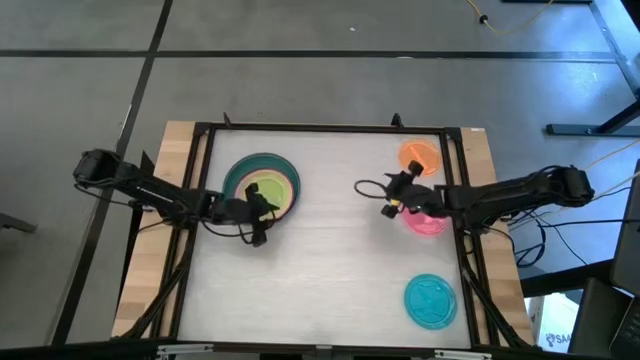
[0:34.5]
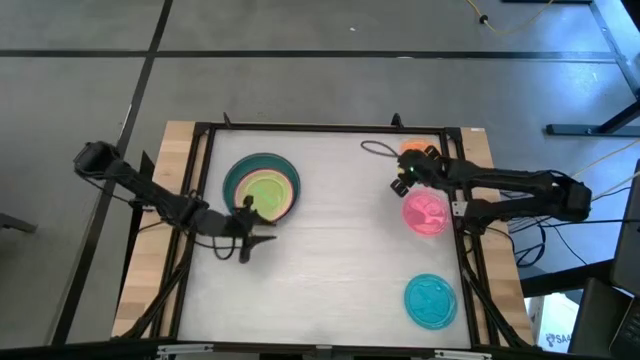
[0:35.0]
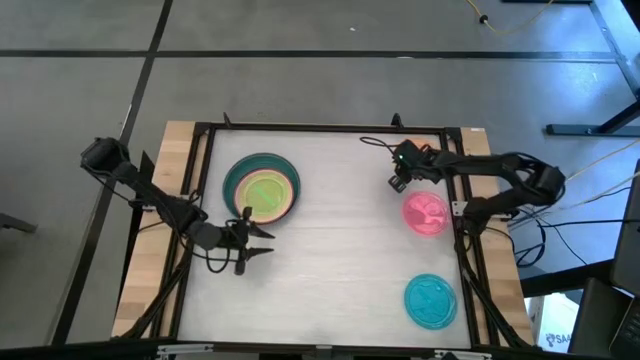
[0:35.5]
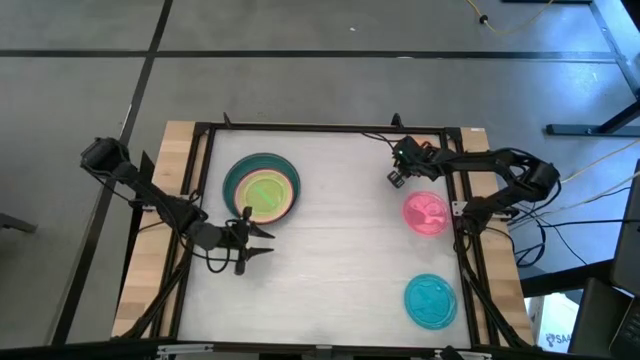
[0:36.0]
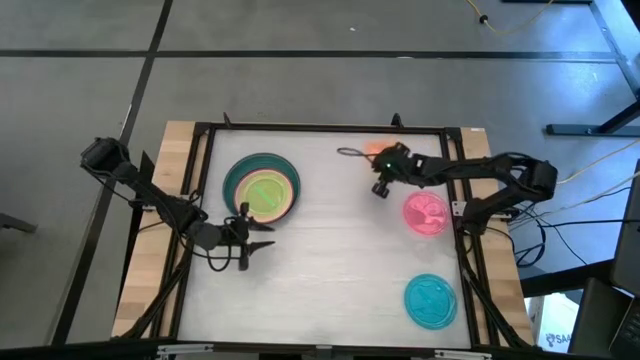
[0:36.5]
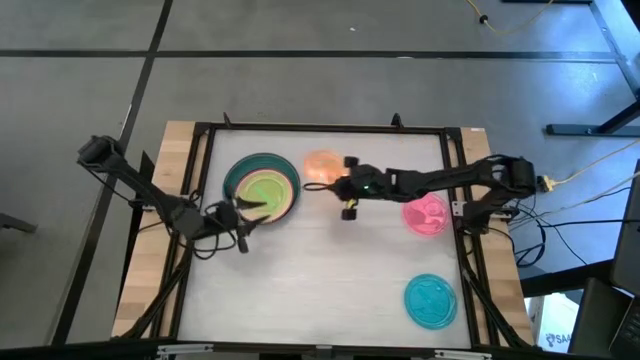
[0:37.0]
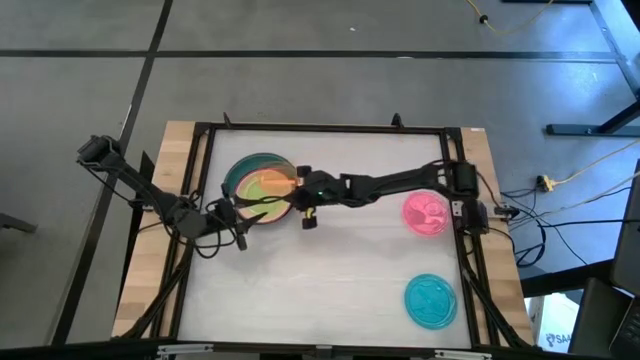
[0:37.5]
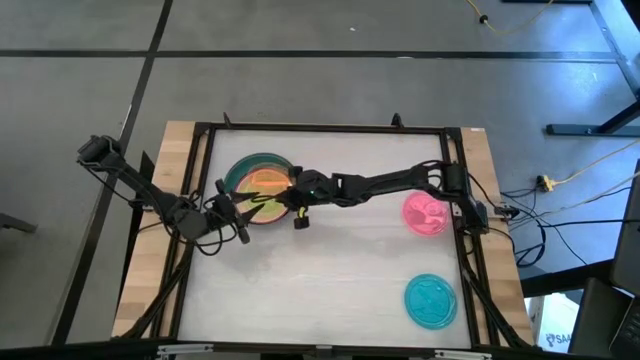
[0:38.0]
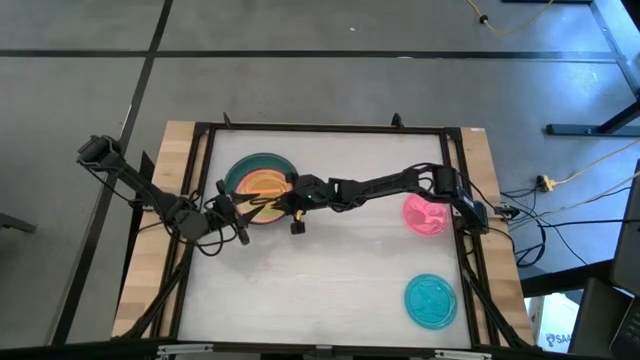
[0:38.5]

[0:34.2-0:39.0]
Task: Stack plastic plates
Stack the orange plate on top of the green plate

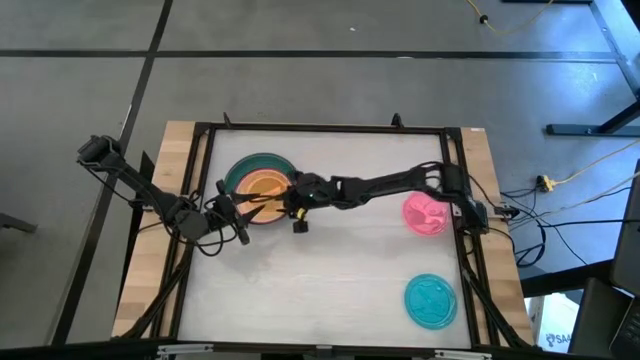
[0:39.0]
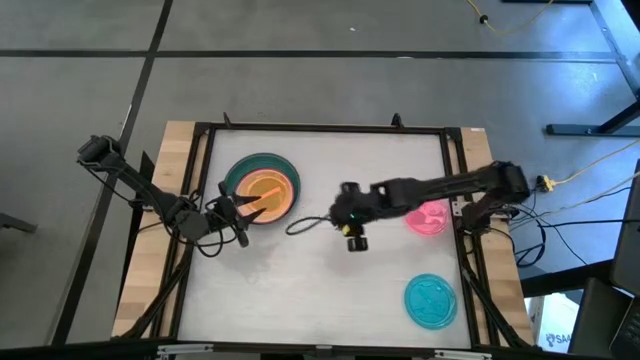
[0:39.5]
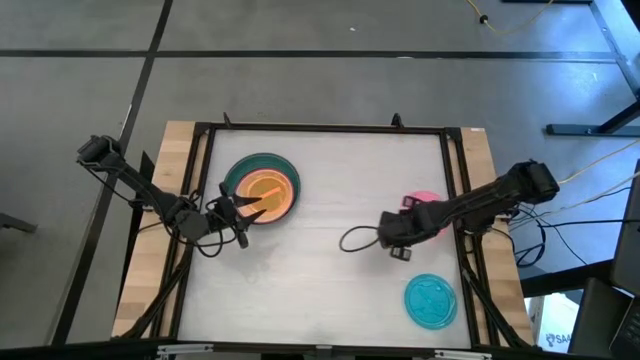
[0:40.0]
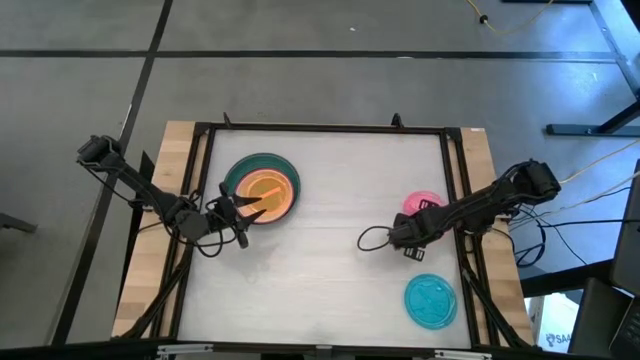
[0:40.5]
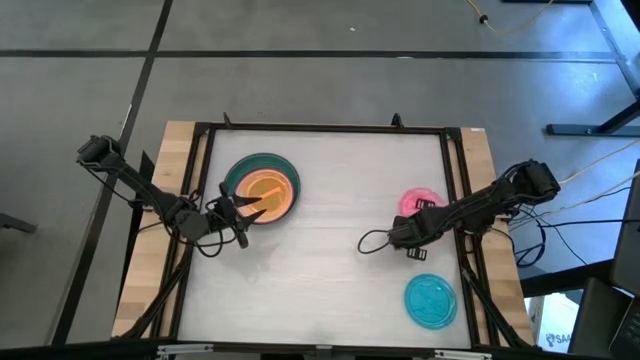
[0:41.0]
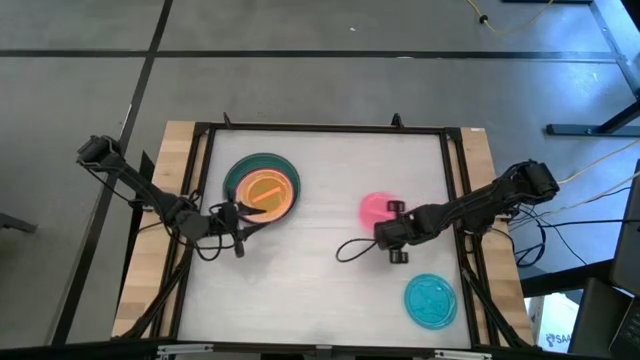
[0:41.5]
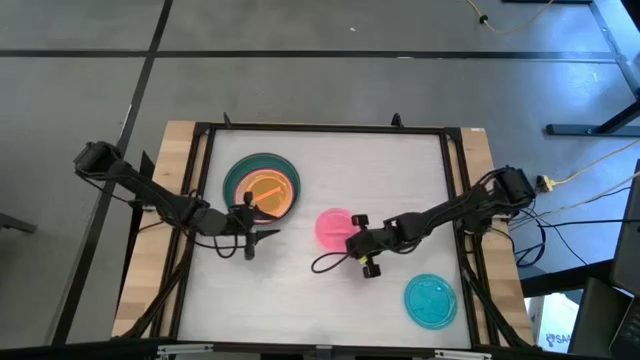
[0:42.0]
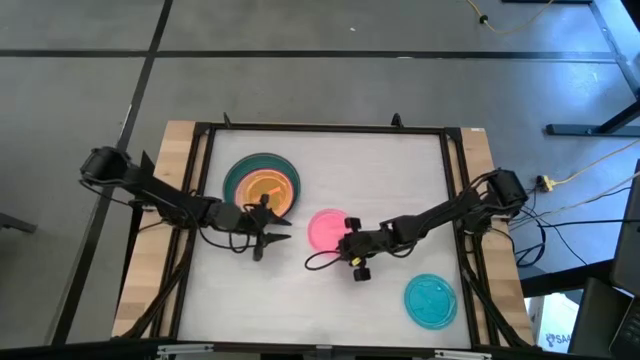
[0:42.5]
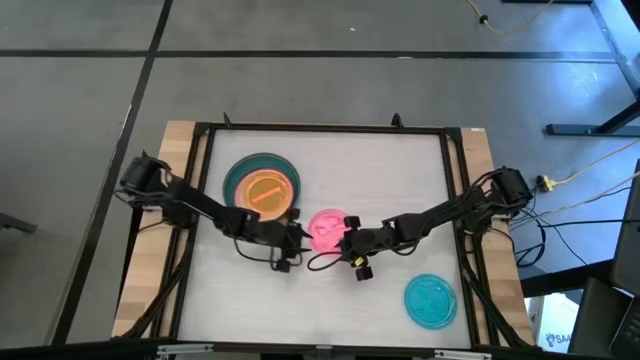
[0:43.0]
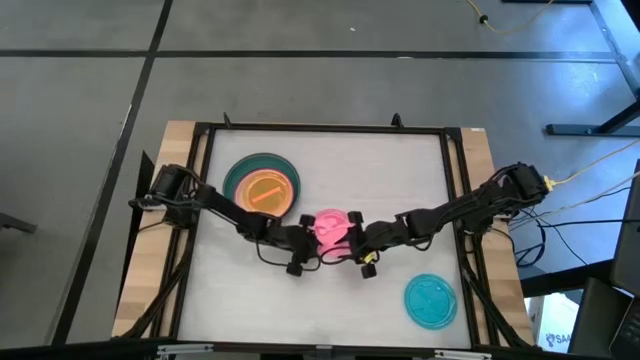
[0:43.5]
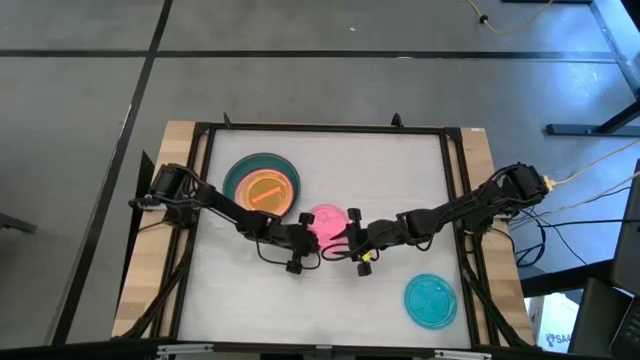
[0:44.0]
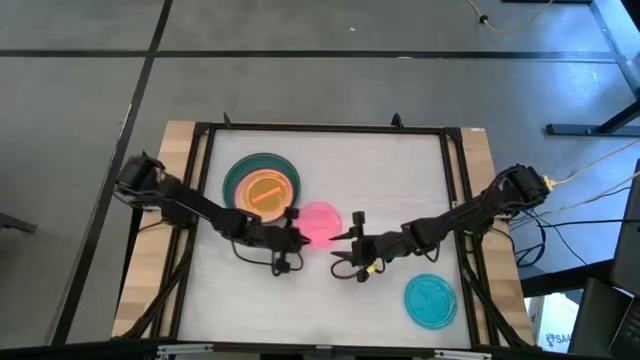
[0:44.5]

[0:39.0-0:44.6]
Stack the pink plate on top of the orange plate

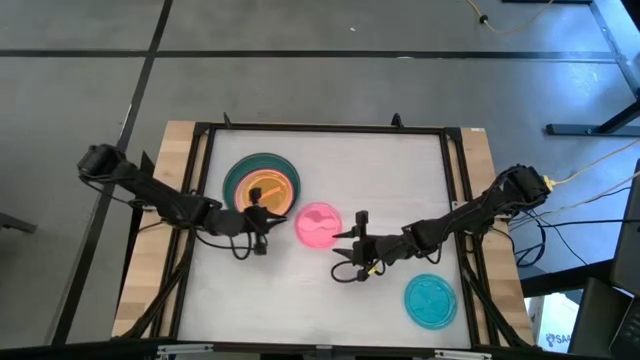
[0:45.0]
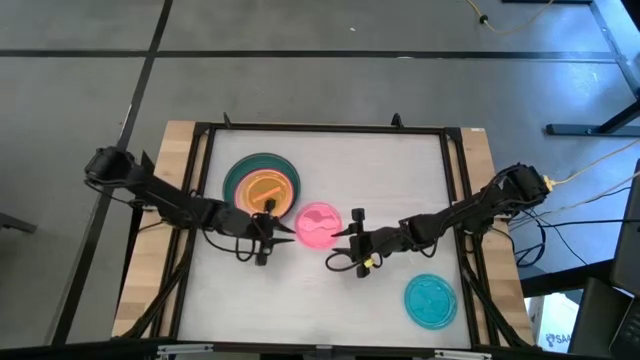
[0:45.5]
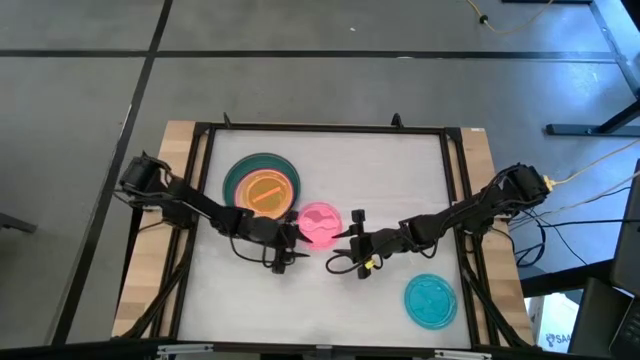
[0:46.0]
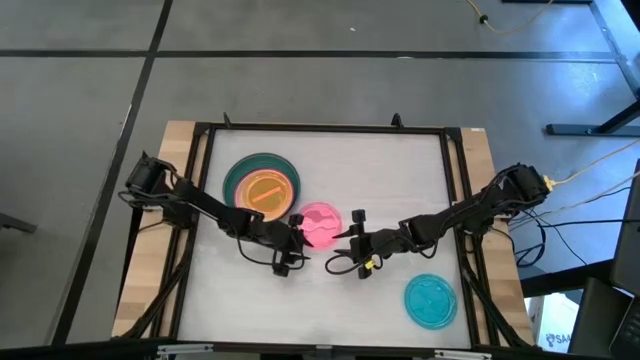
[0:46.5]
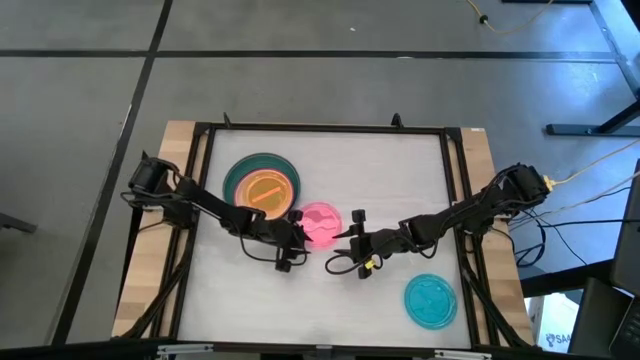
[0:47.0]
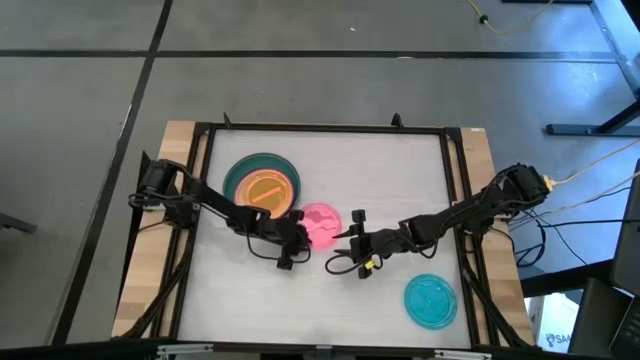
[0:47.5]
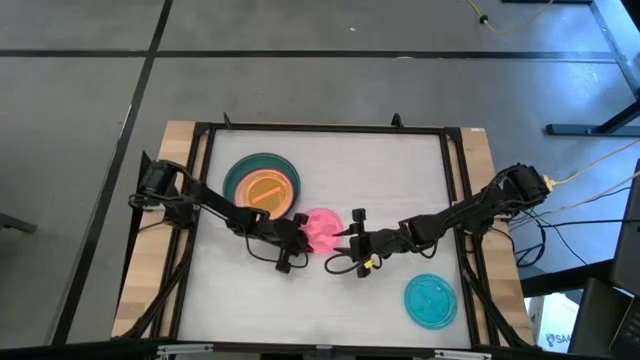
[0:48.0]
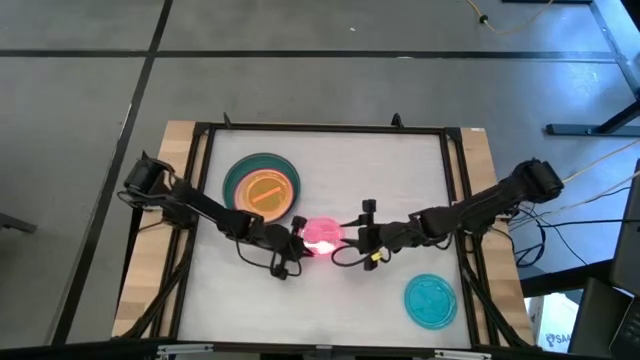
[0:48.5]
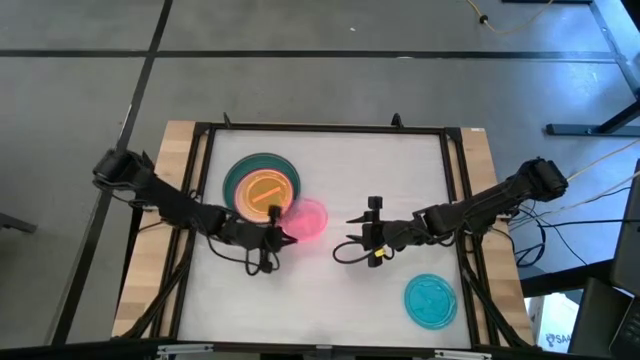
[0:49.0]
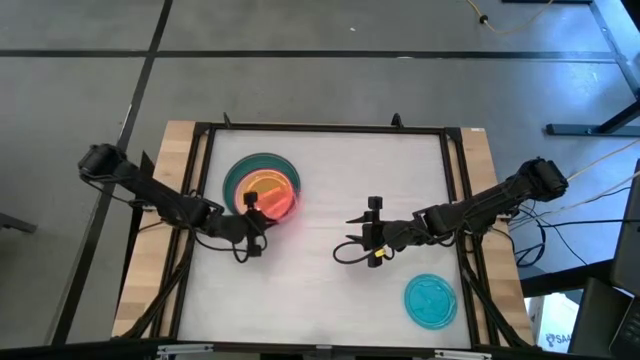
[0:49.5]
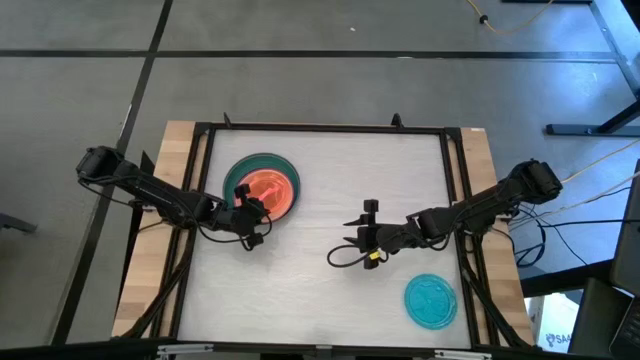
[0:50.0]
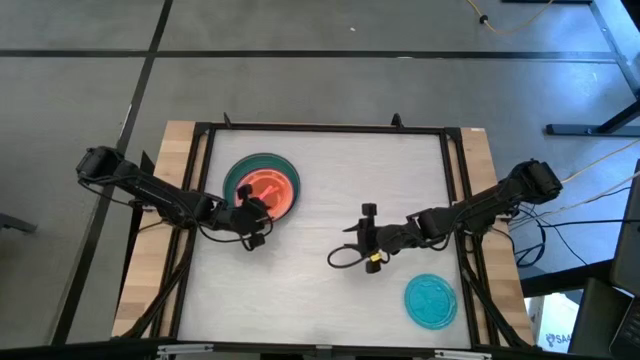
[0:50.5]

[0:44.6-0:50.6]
Stack the pink plate on top of the orange plate

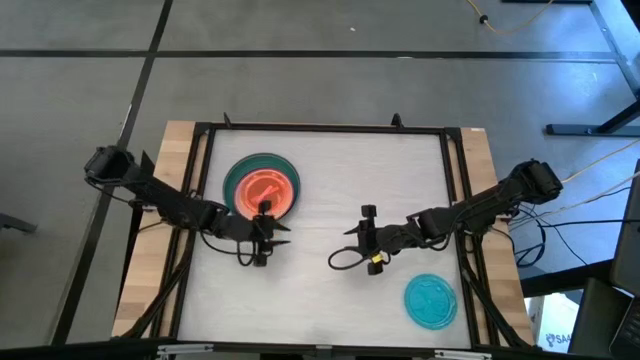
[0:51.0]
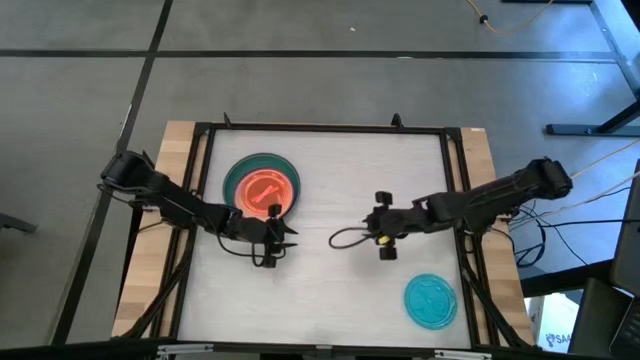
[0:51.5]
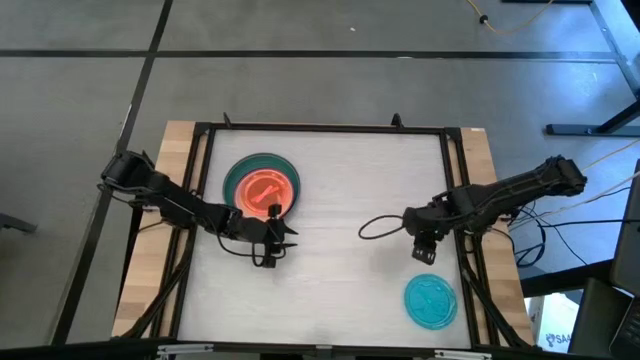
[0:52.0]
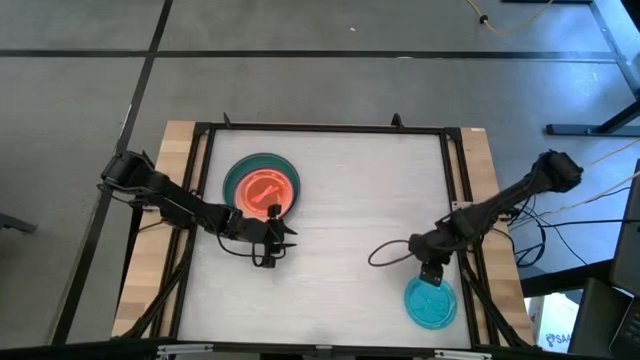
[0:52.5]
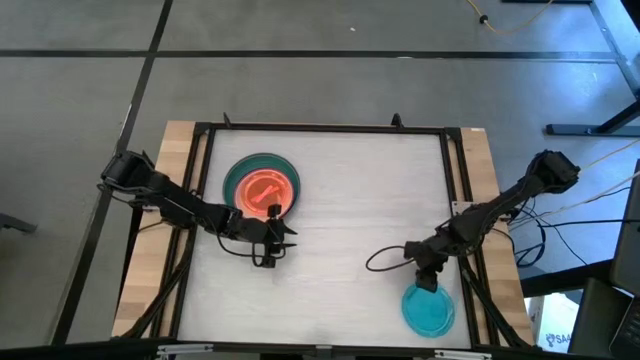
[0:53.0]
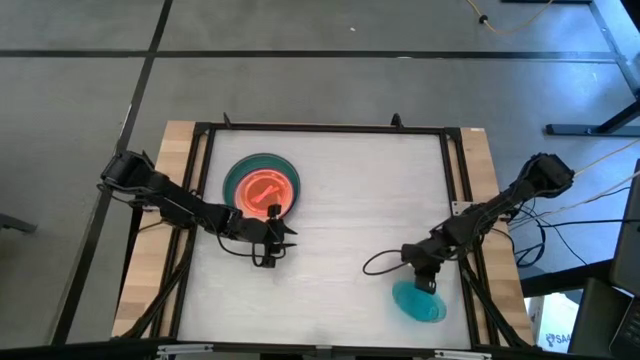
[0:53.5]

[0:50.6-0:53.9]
Stack the blue plate on top of the pink plate

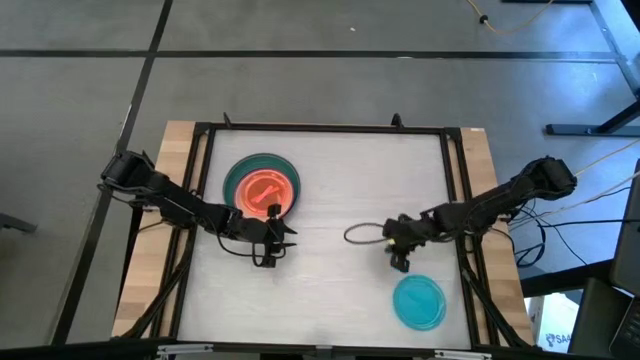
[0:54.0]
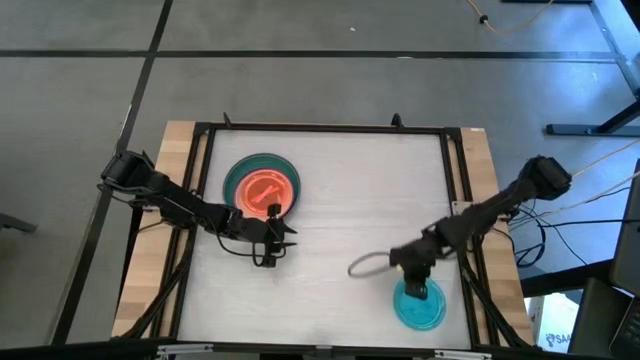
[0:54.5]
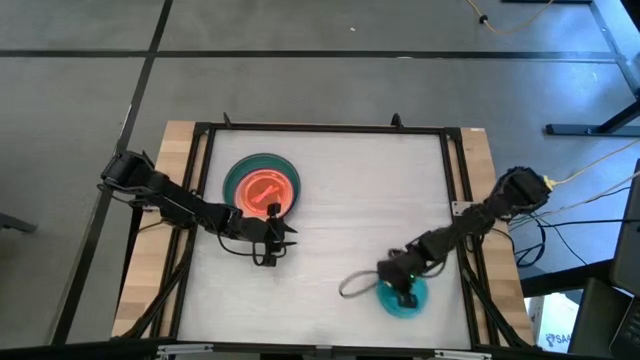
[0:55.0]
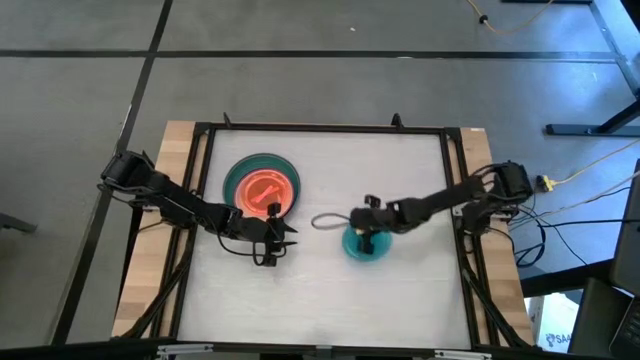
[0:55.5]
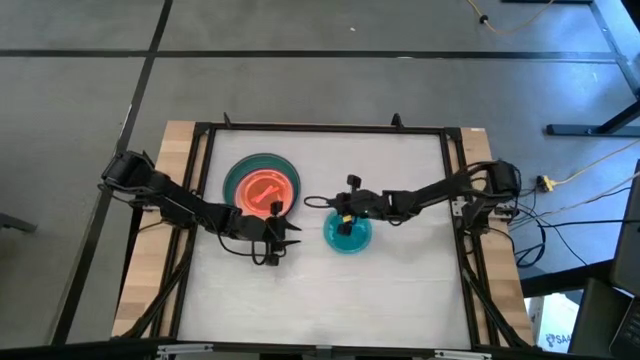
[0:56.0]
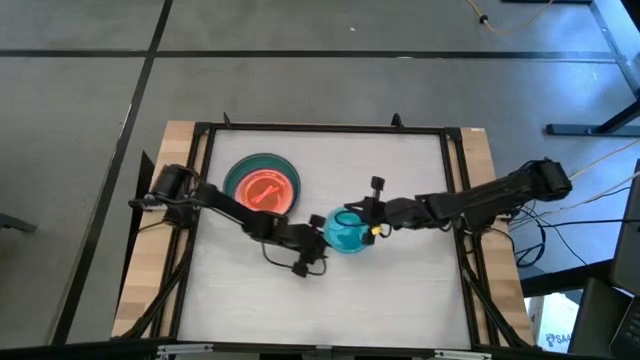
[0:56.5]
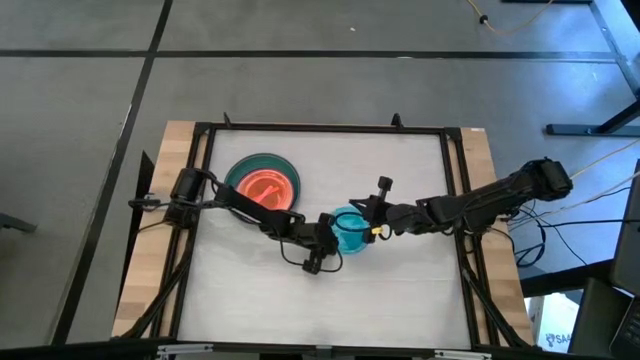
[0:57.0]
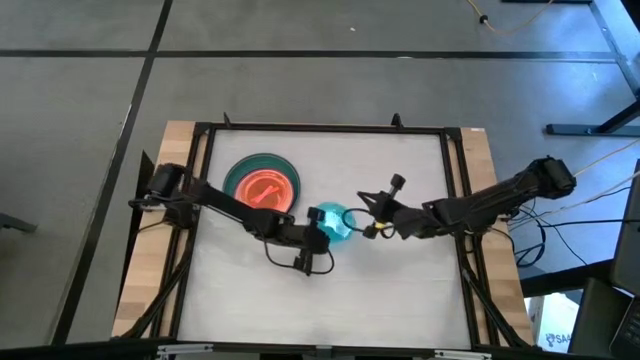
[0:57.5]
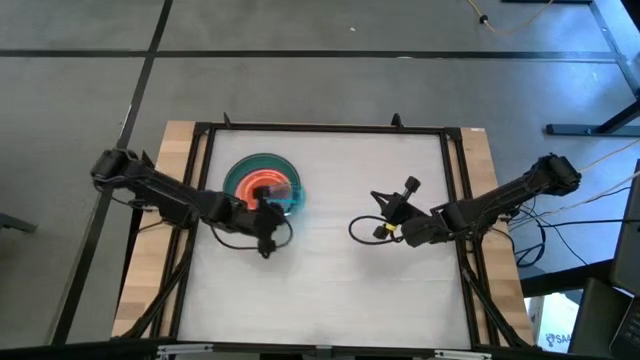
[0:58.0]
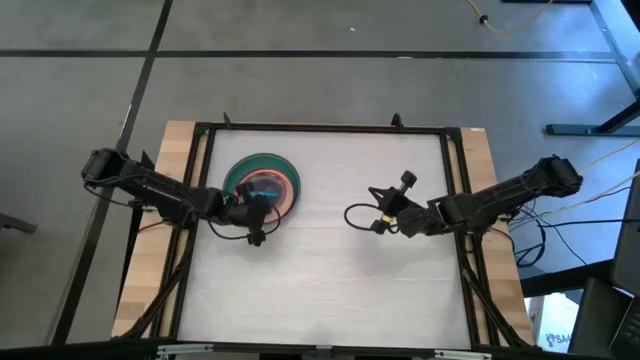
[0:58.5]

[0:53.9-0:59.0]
Stack the blue plate on top of the pink plate
